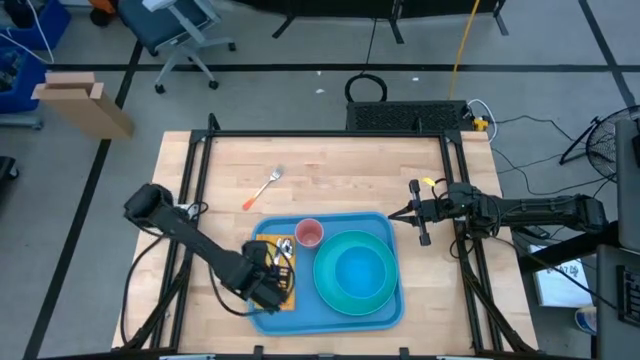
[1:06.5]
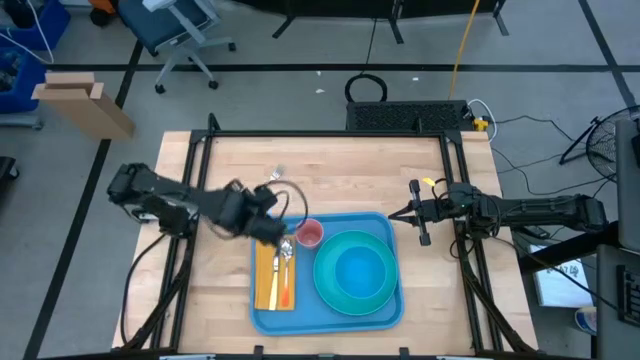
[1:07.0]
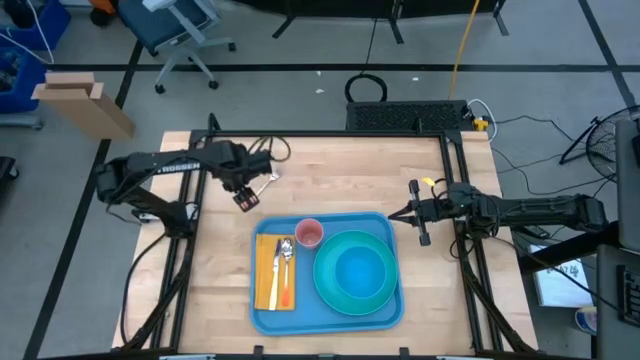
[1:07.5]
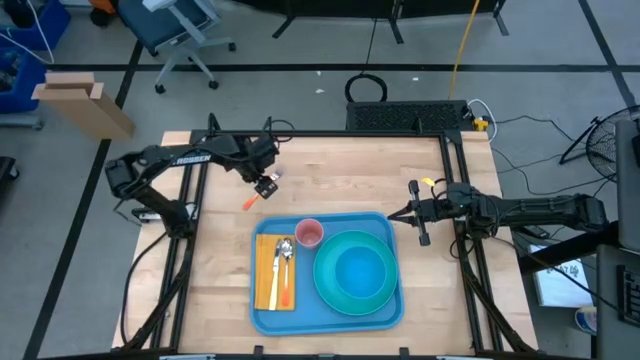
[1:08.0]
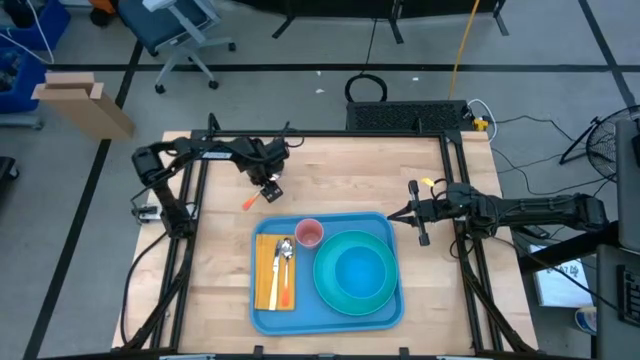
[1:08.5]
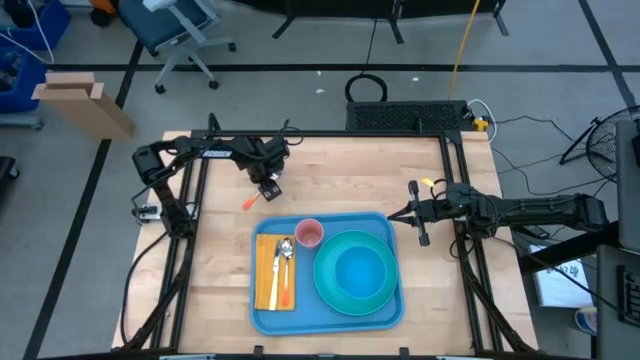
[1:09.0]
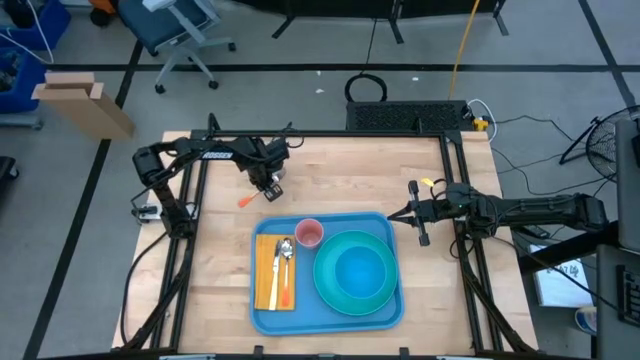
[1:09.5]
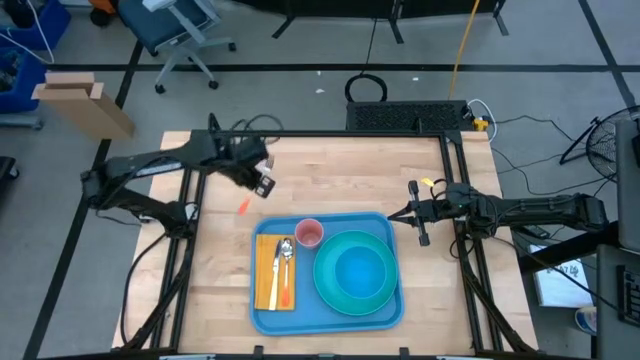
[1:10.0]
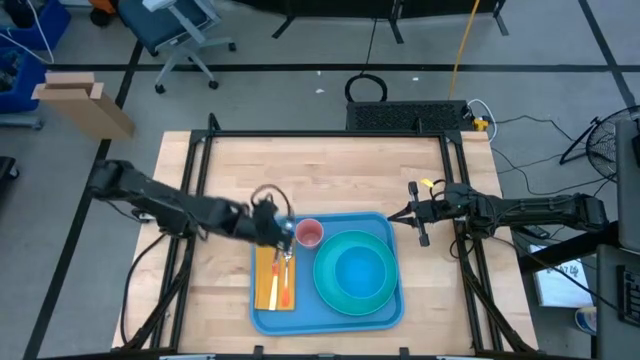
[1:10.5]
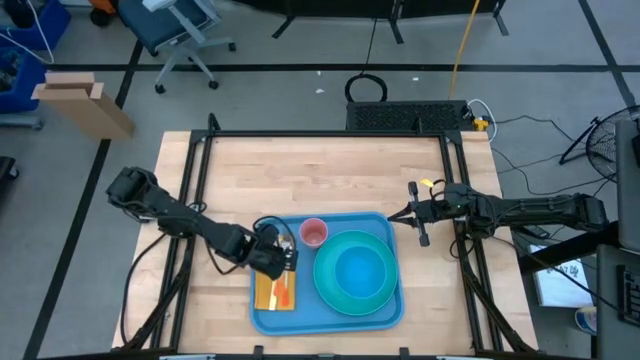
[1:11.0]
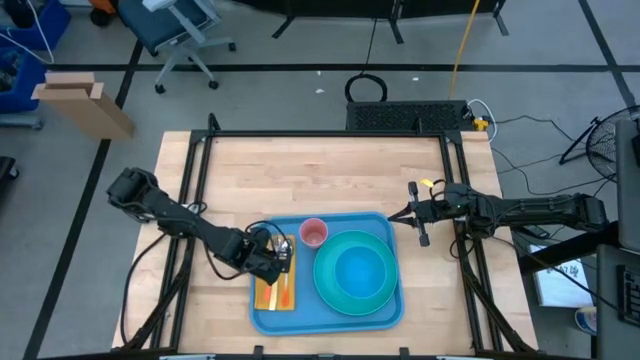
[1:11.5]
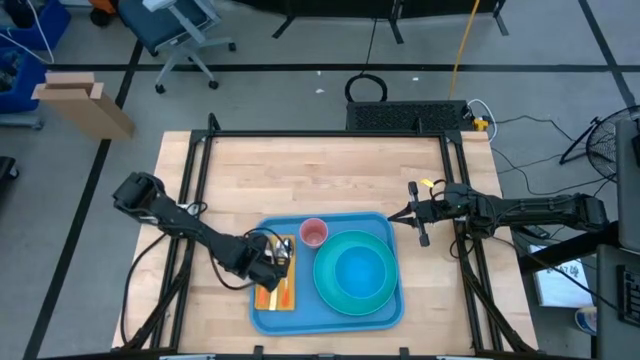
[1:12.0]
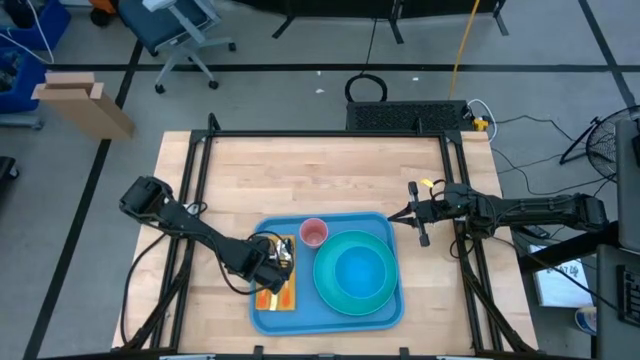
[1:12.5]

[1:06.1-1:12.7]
Task: Set up tray
Put the white and orange fork on the left side of the yellow knife

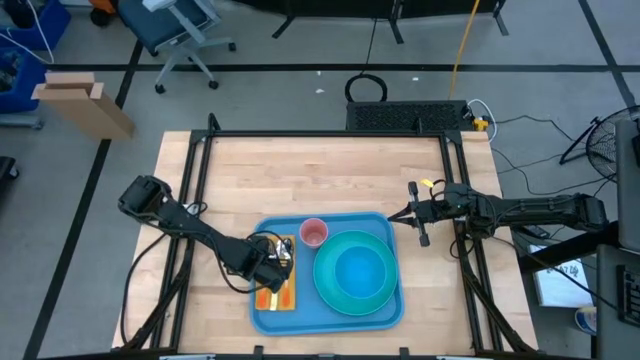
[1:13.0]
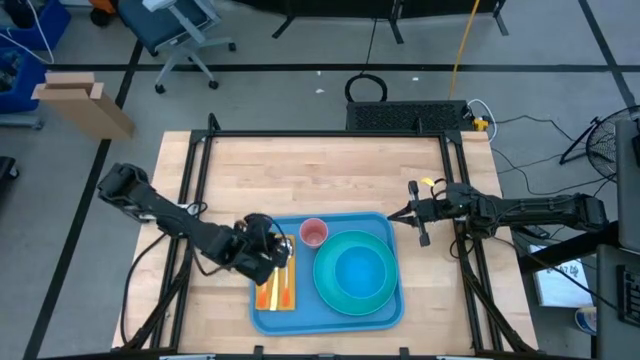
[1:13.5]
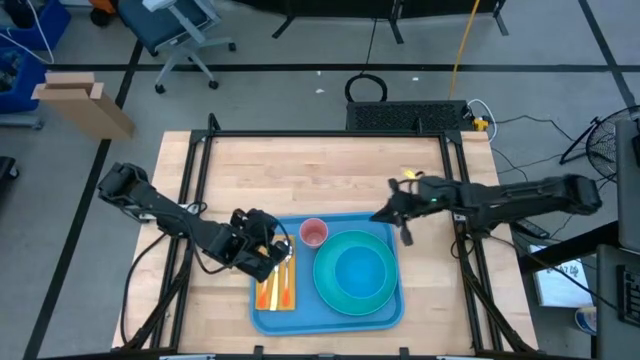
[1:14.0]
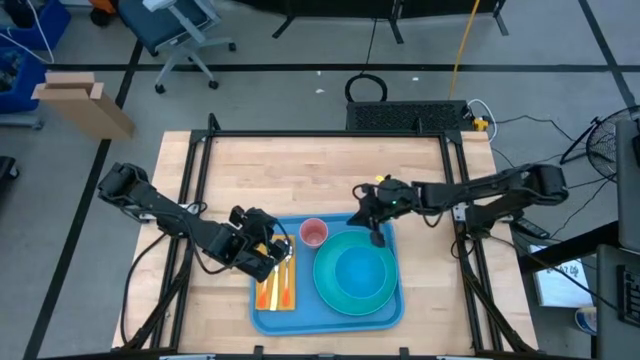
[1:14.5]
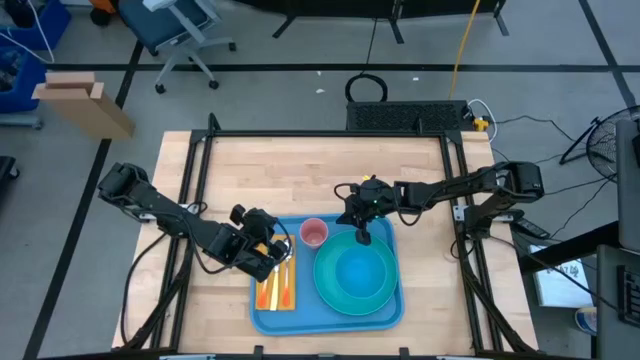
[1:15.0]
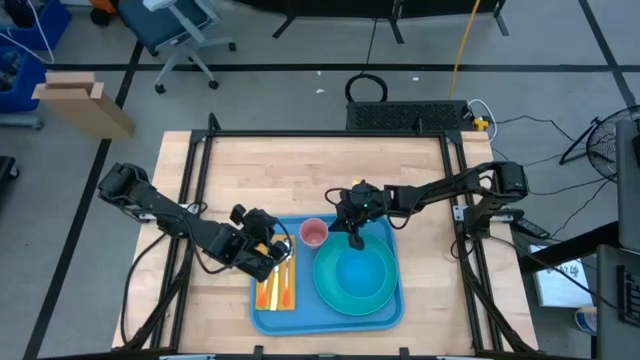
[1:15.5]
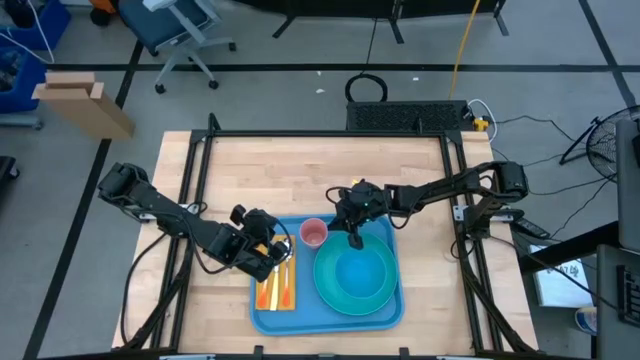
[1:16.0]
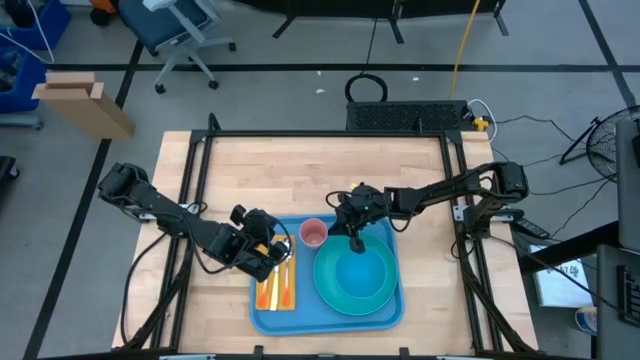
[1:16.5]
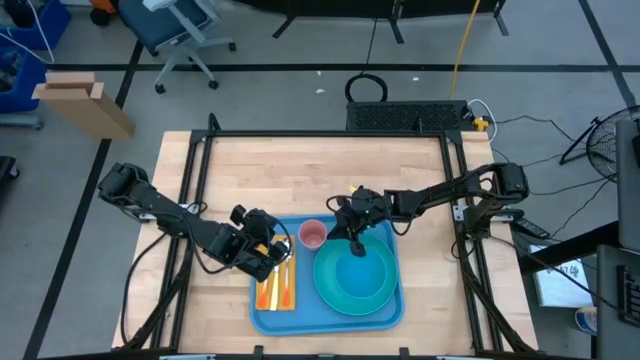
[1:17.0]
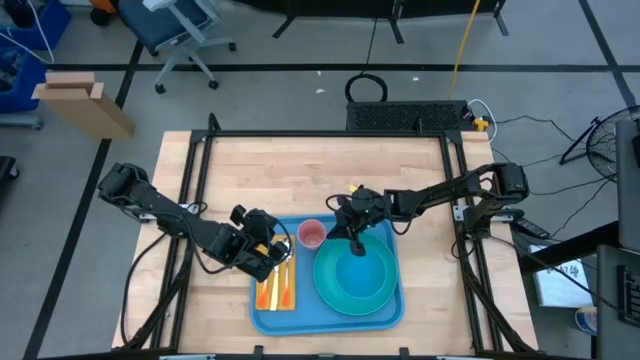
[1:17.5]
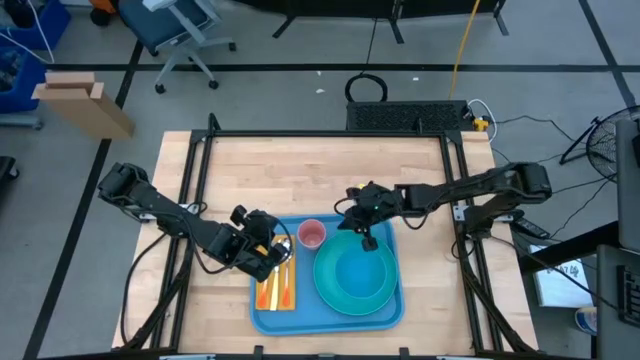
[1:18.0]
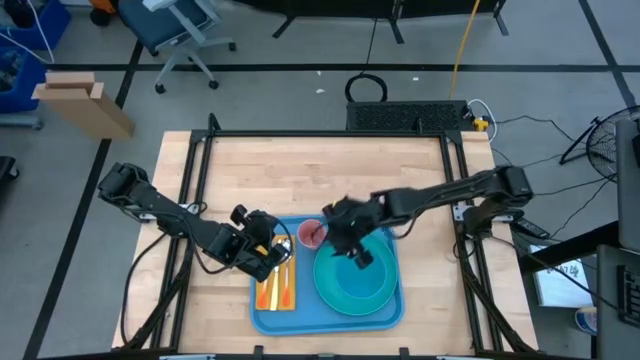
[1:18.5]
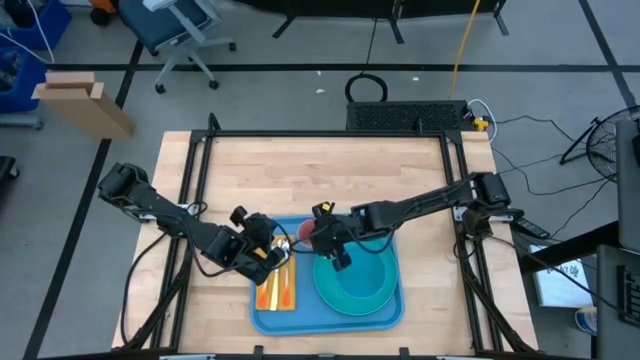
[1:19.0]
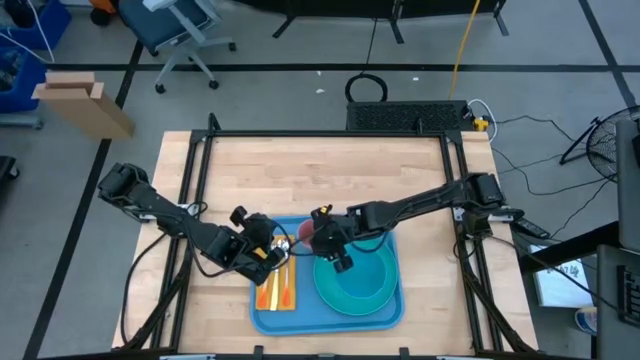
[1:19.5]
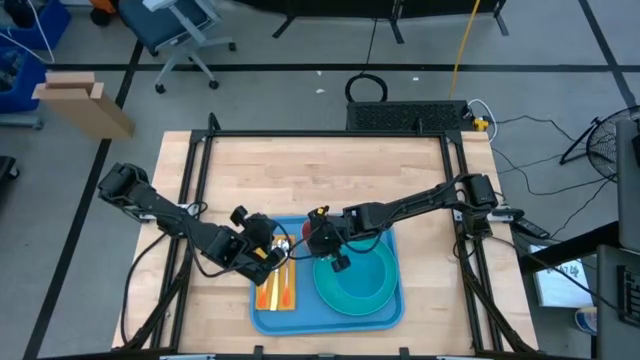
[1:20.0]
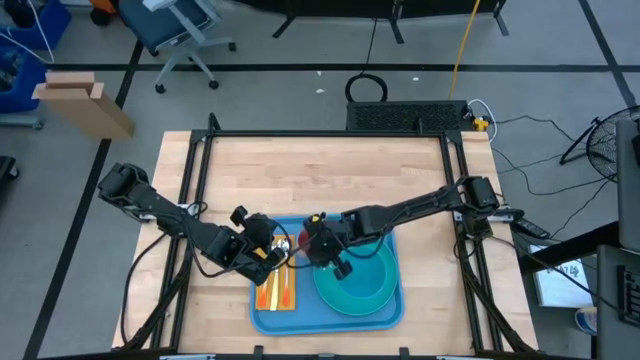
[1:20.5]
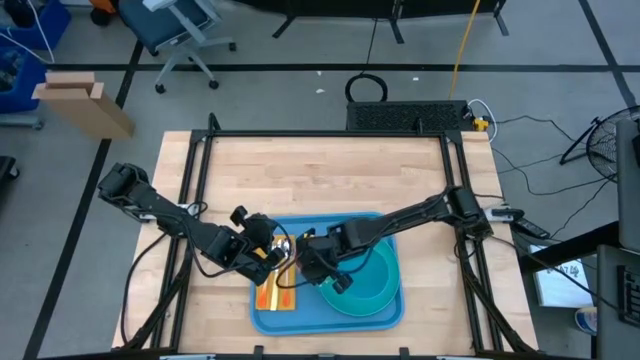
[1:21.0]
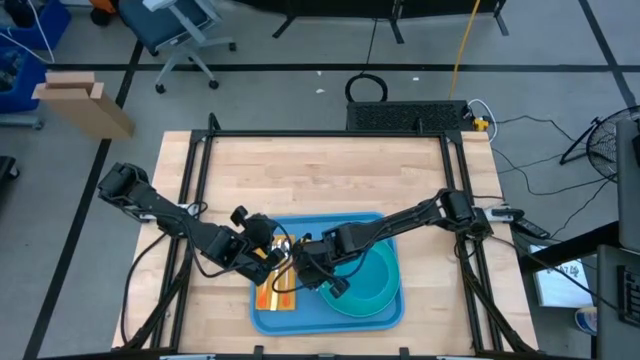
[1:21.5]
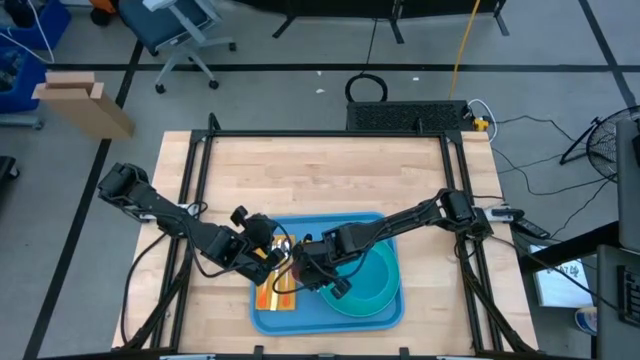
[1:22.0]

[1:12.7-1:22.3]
Adjust the pink cup

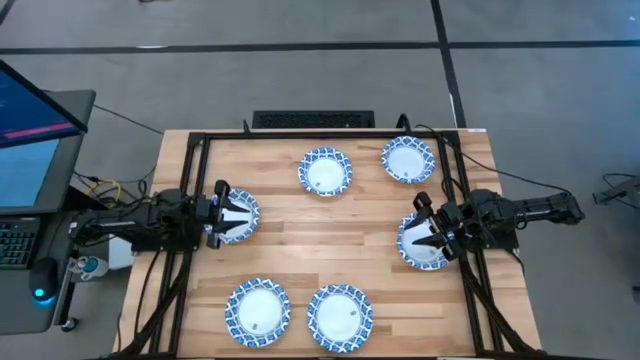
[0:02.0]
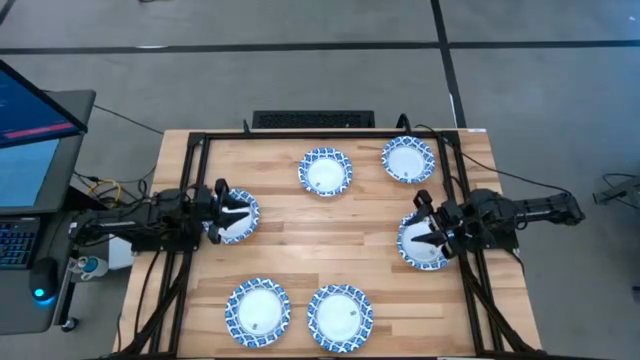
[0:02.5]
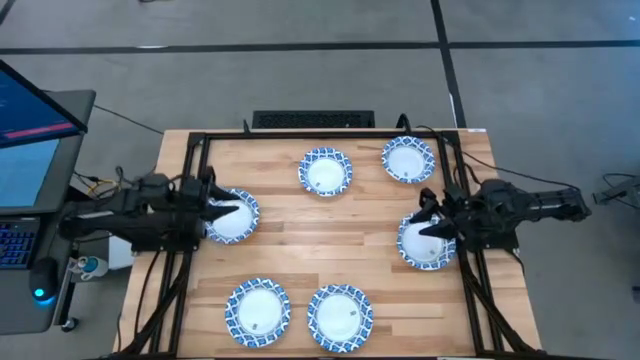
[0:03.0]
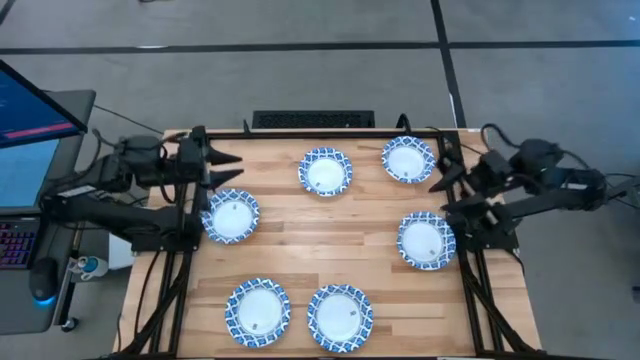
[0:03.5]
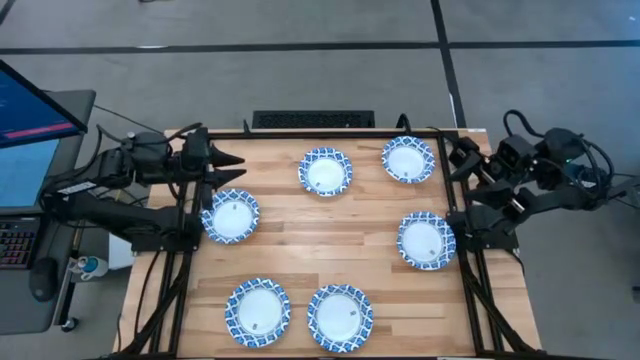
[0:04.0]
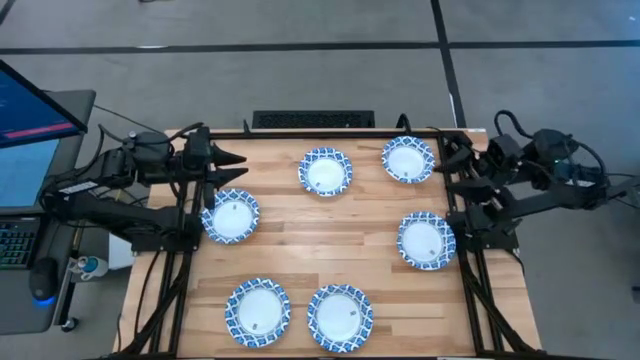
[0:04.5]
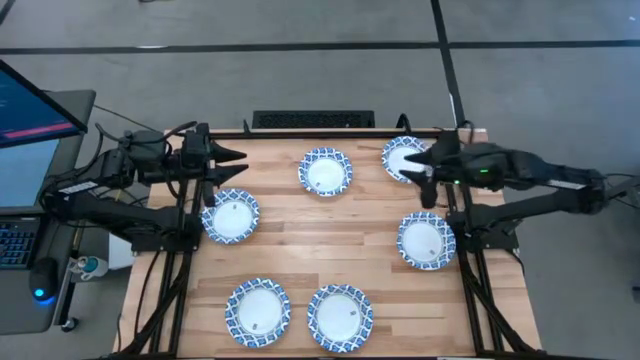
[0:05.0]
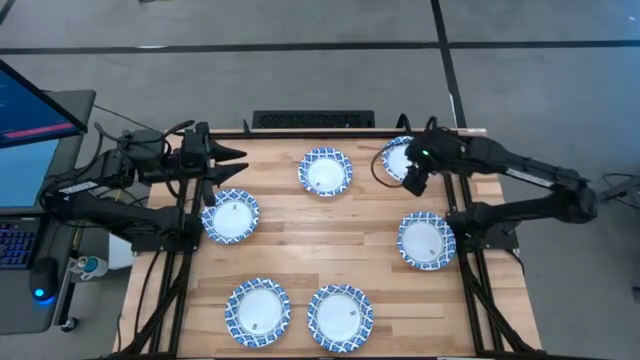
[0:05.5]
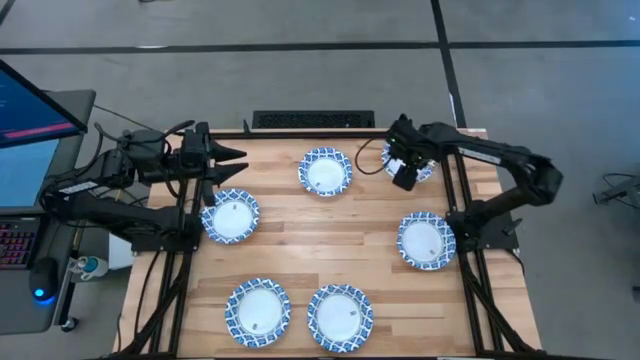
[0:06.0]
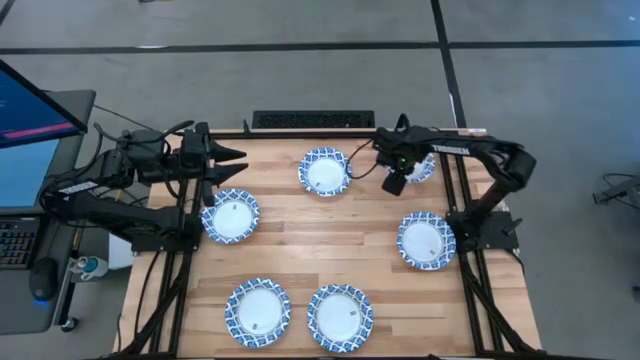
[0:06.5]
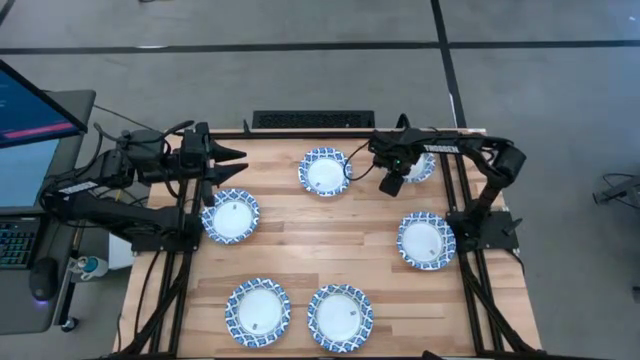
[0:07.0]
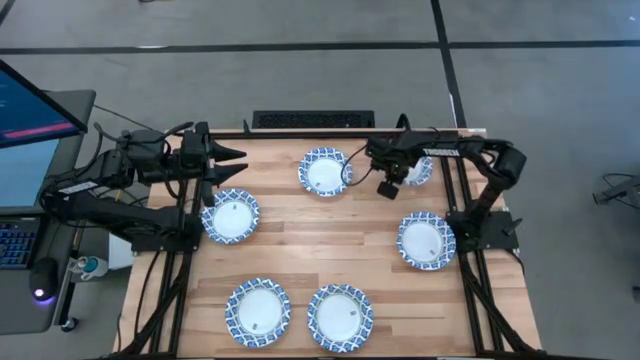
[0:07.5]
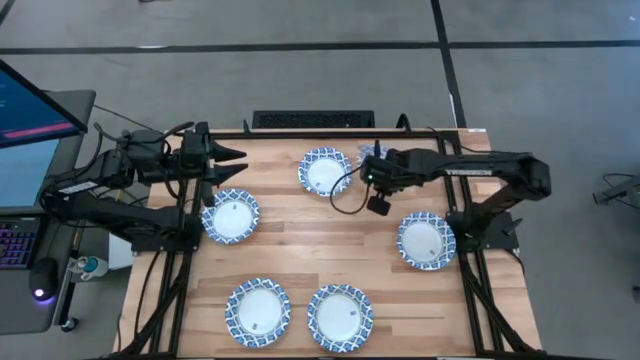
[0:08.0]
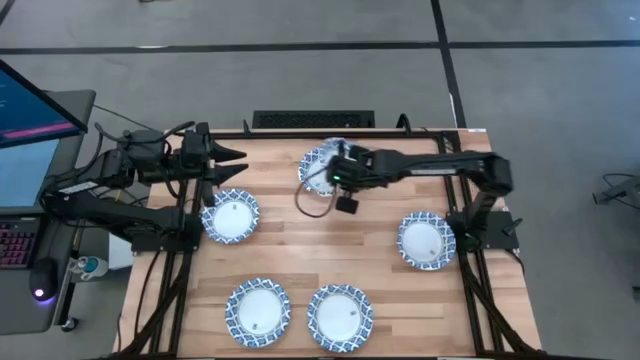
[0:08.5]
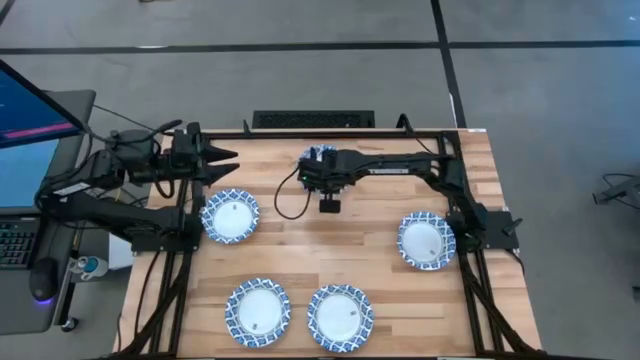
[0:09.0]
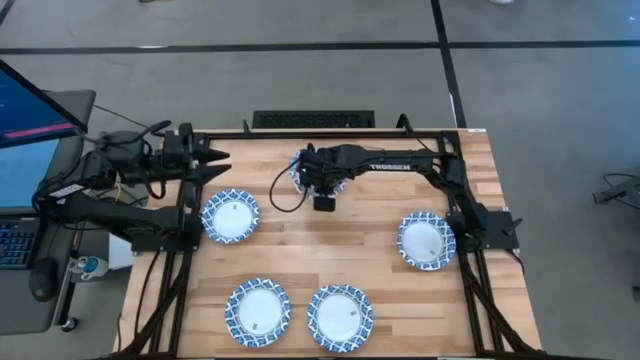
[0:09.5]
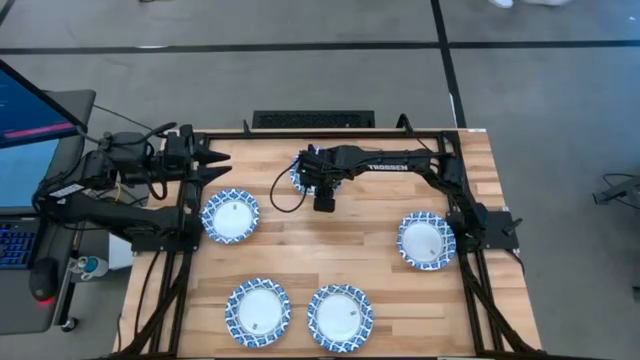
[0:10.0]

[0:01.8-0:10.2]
Task: Nest bowls inside each other
Stack the white bowl on top of the other white bowl
